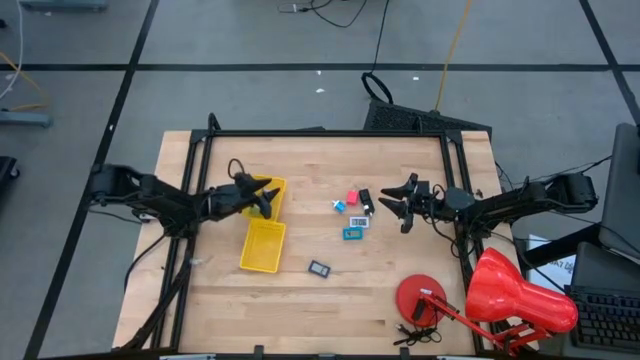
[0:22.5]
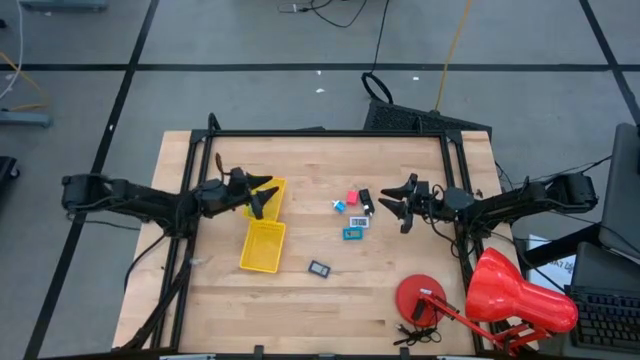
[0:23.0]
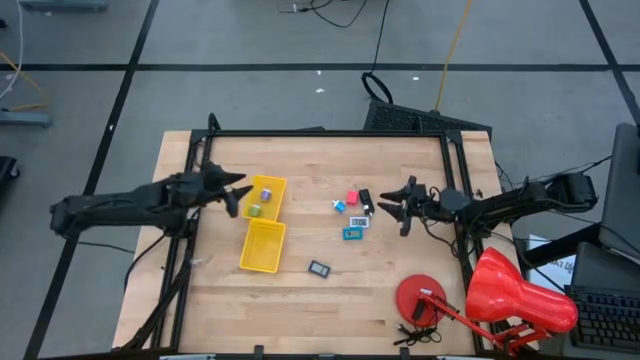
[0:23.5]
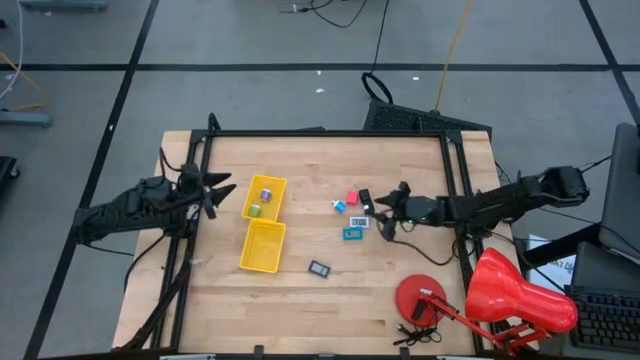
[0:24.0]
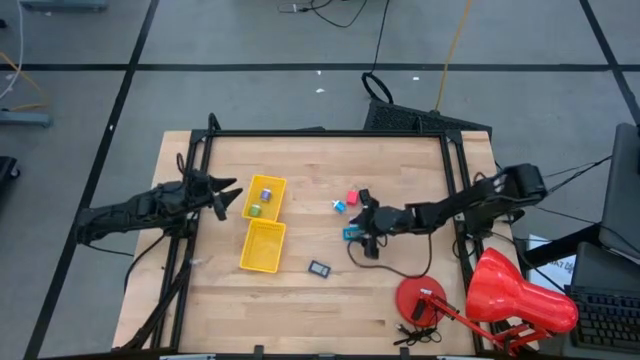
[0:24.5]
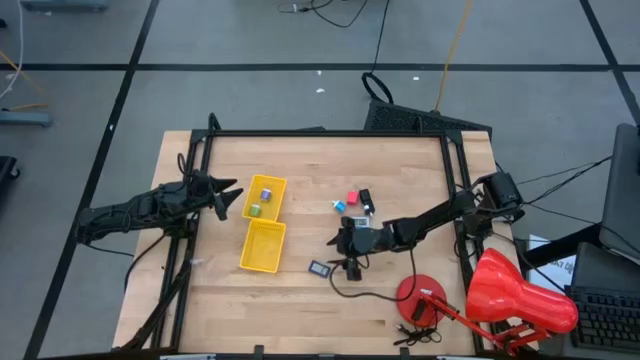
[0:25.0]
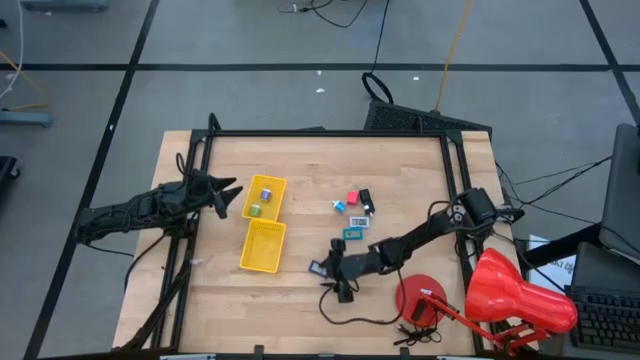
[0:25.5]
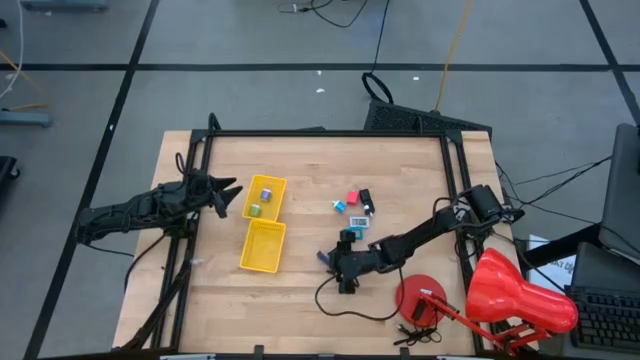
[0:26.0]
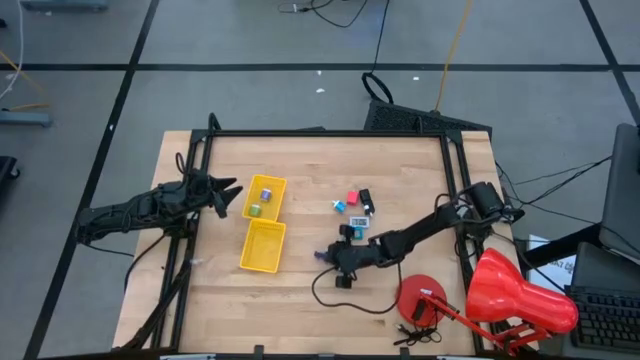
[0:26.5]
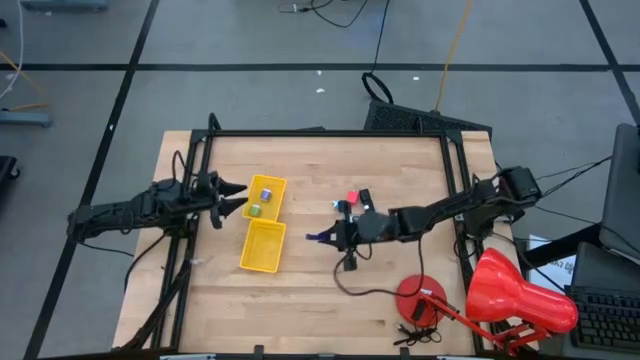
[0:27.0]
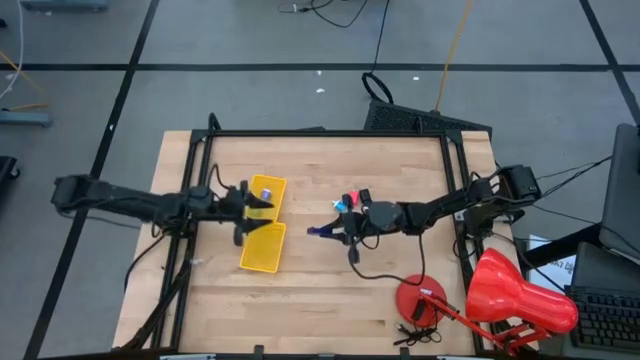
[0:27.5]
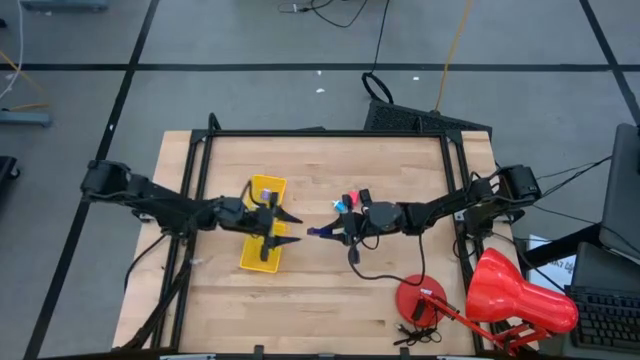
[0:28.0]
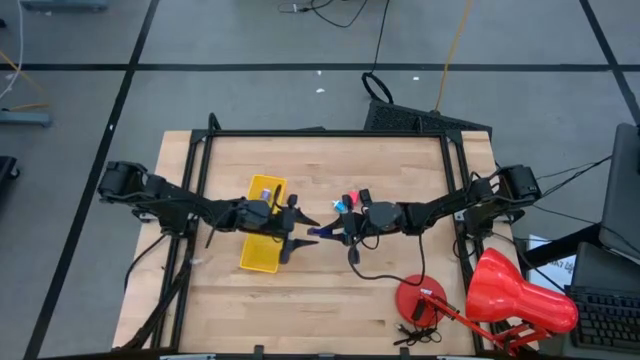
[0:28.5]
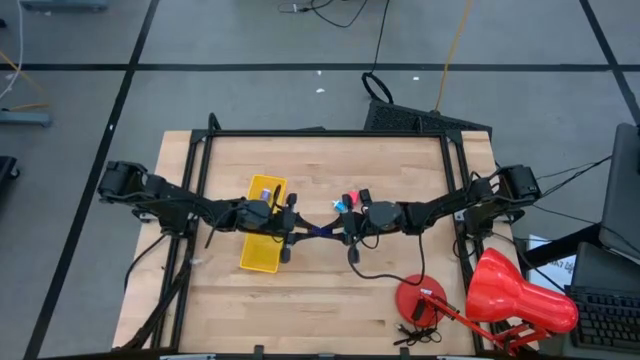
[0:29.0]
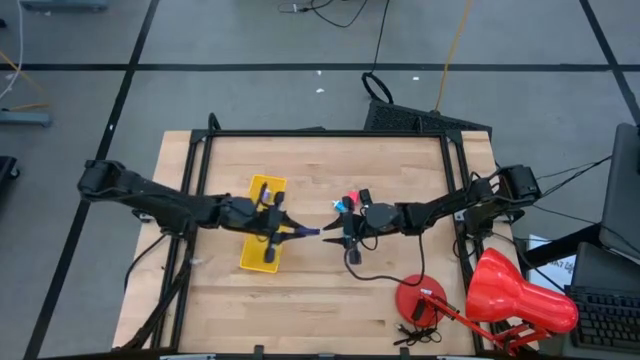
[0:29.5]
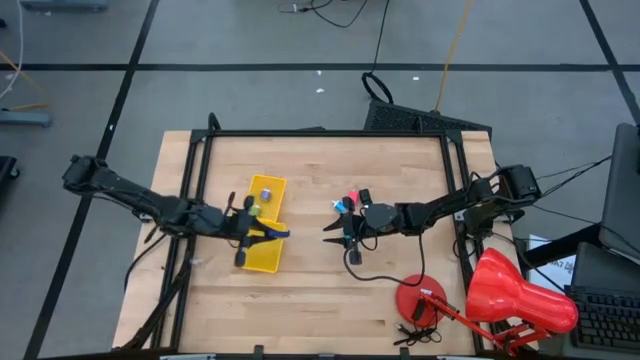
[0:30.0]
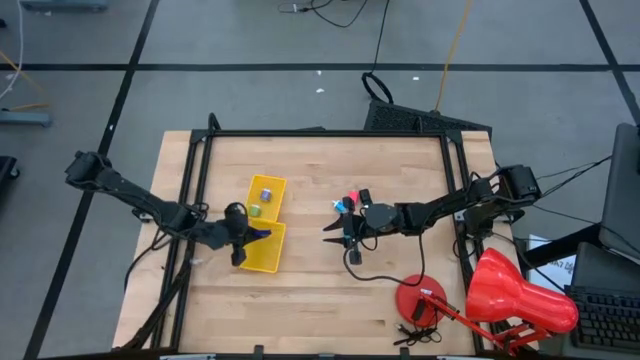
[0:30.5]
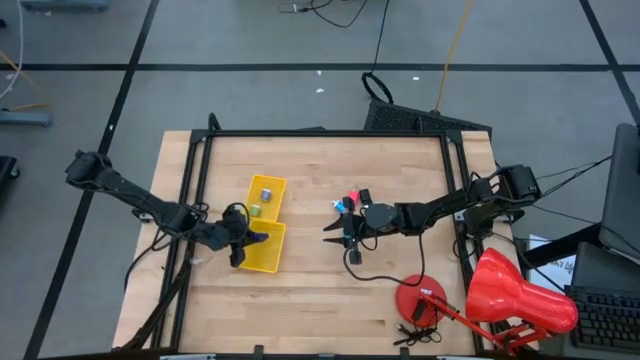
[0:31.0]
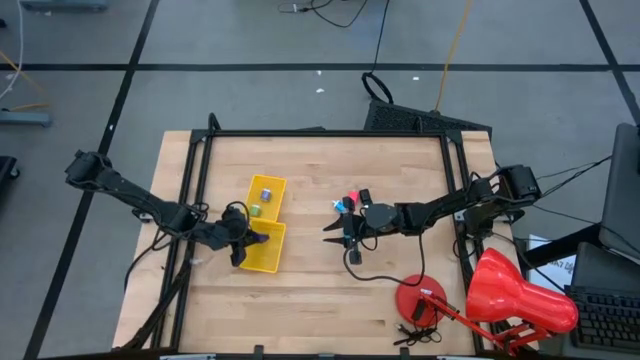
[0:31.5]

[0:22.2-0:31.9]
Task: Pick & Place Office items
Put the blue timer into the bottom yellow basket

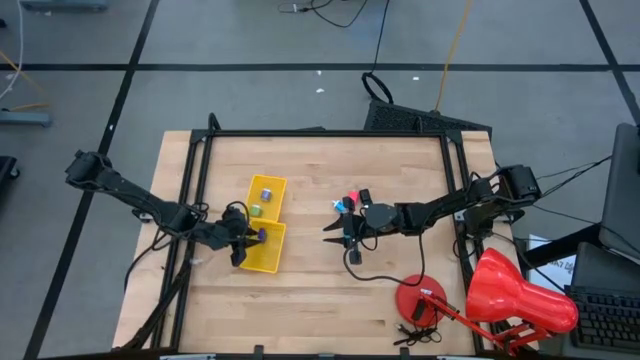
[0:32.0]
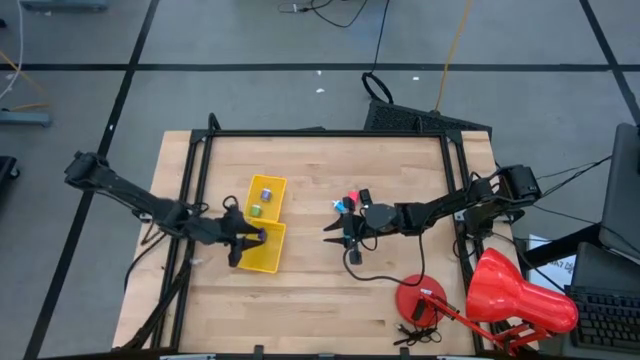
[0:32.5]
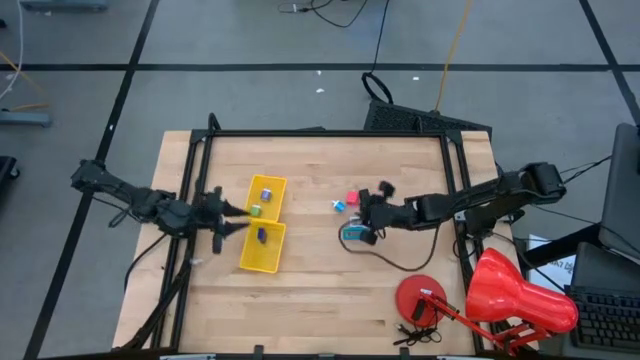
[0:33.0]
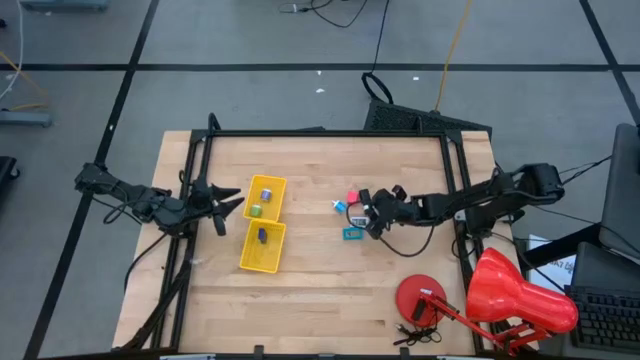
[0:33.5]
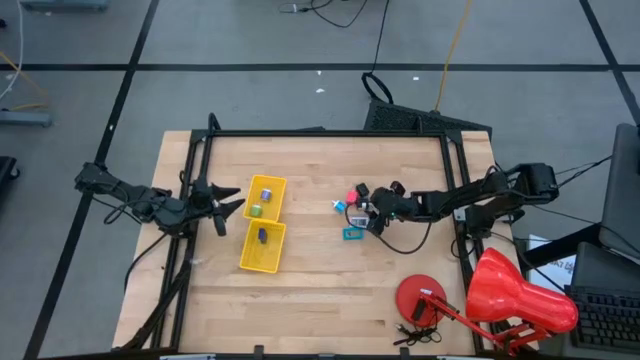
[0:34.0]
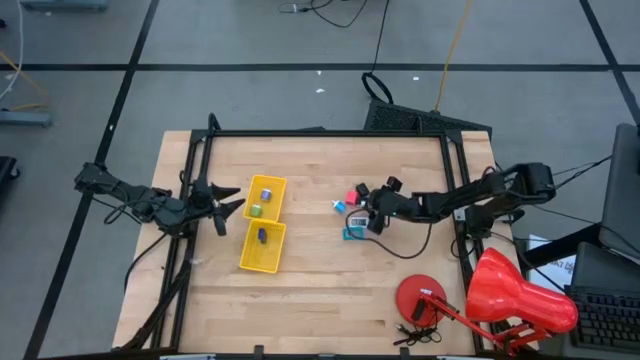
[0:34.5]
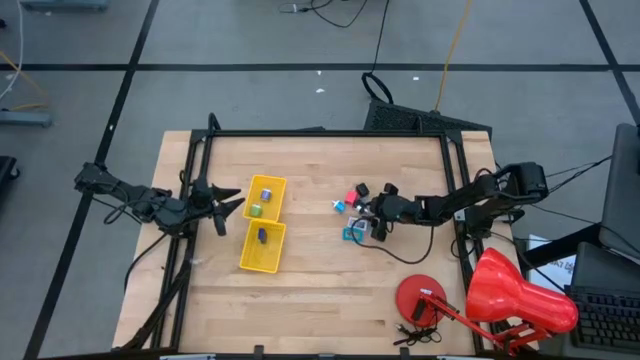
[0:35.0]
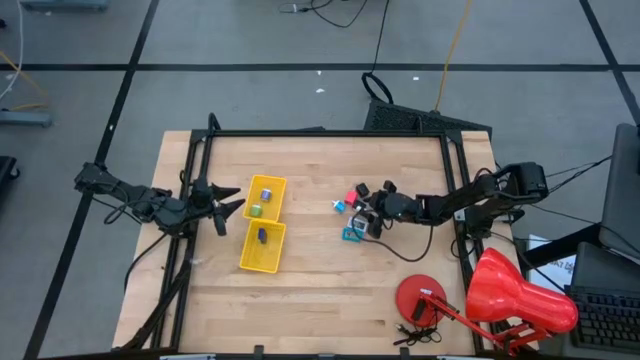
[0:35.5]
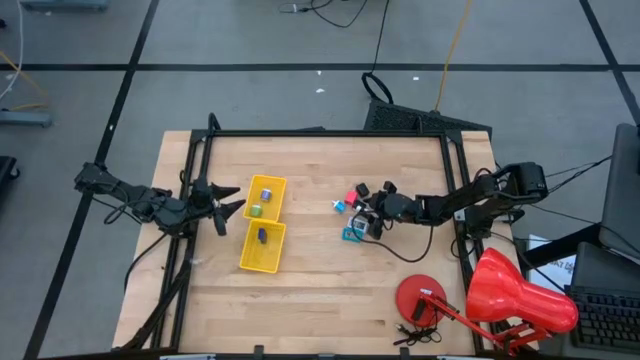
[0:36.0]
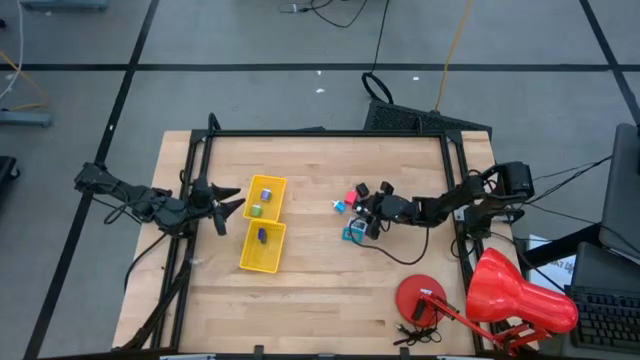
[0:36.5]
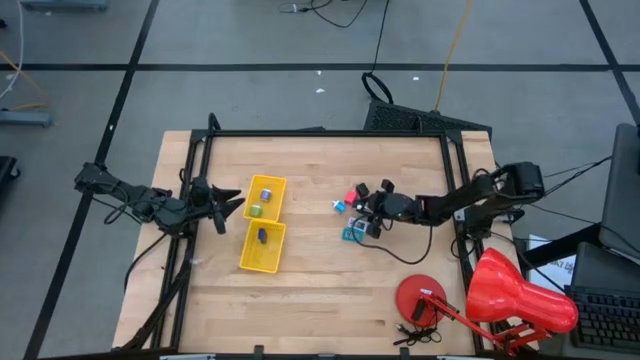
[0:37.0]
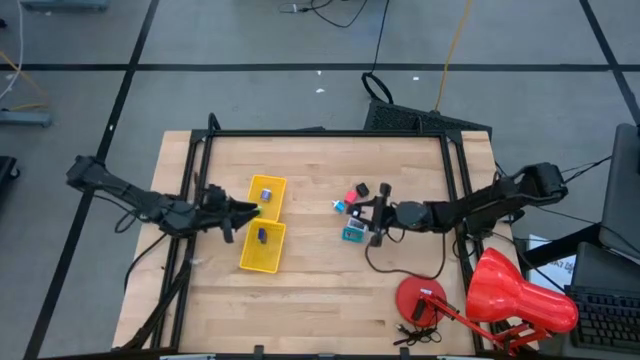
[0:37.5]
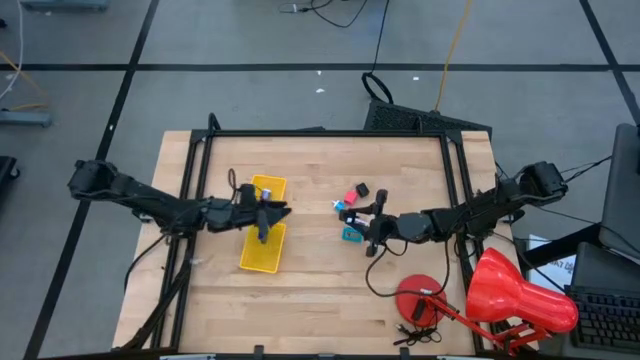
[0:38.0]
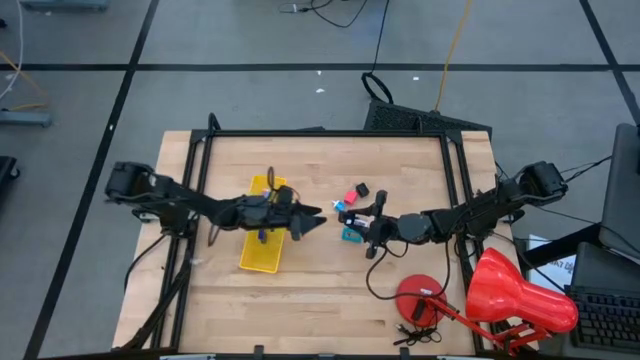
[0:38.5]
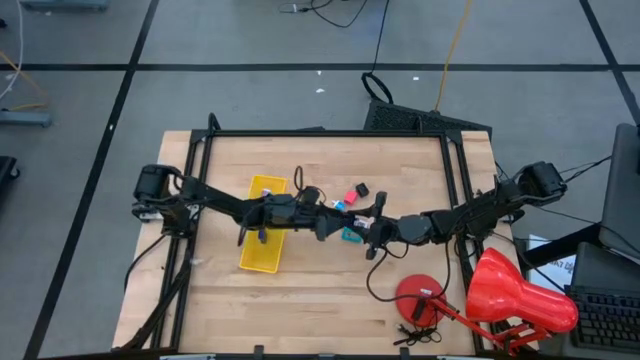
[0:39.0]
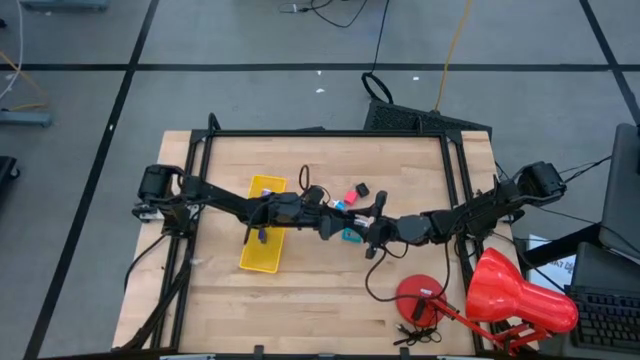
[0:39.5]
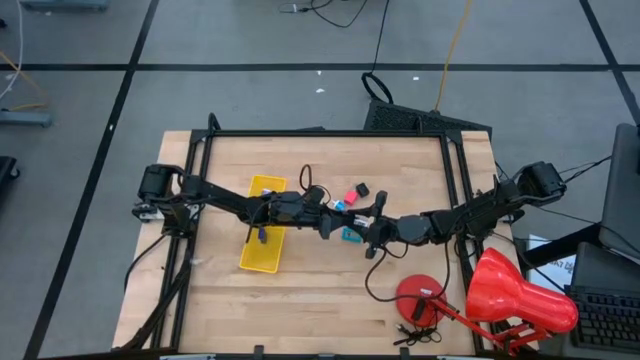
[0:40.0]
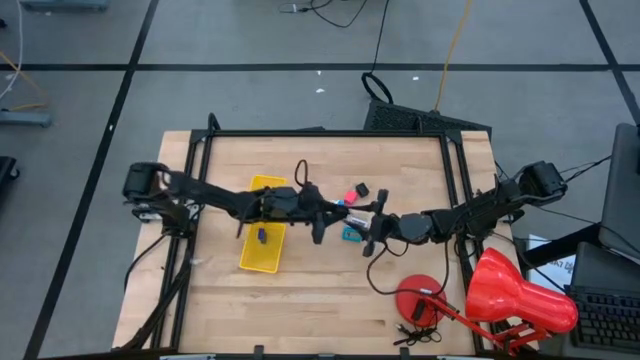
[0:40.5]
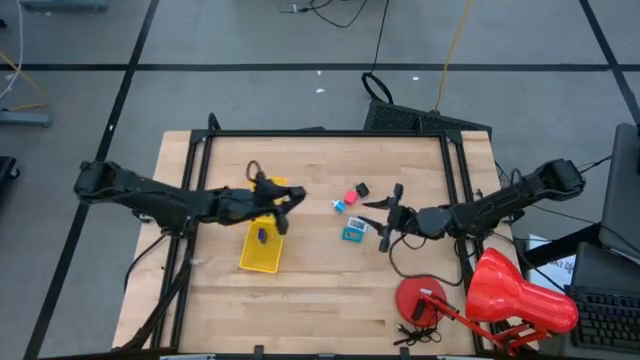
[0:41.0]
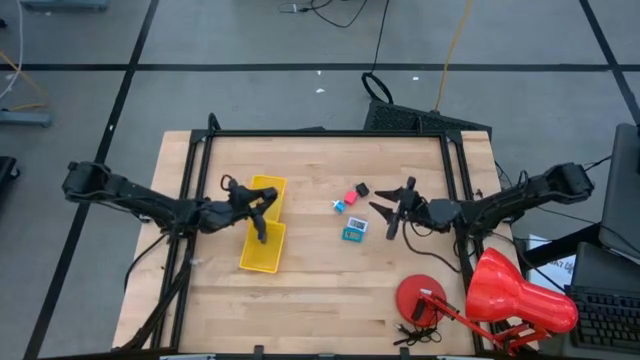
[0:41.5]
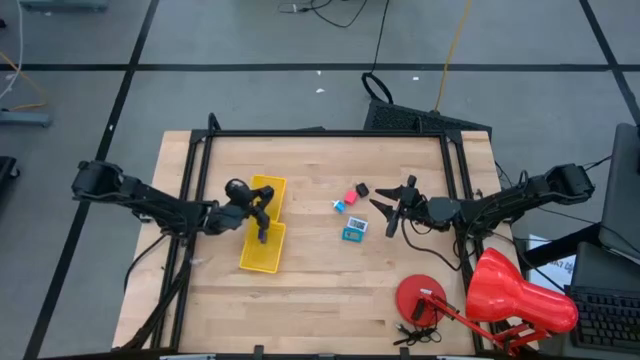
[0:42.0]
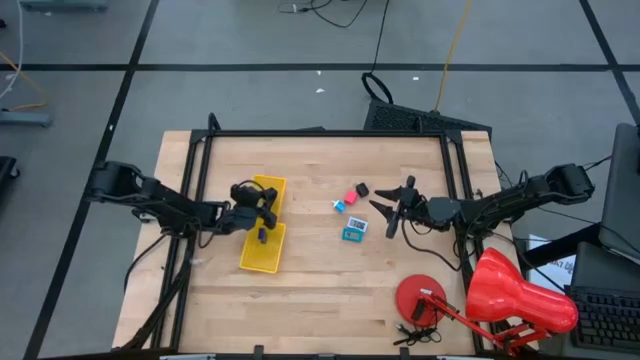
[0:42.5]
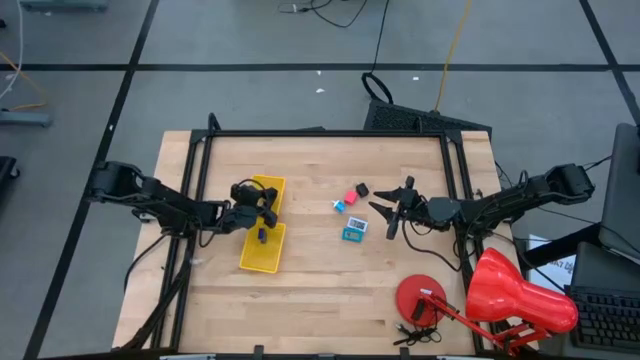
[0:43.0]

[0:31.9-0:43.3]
Put the bottom black adapter into the top yellow basket
